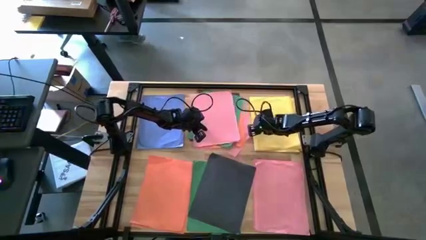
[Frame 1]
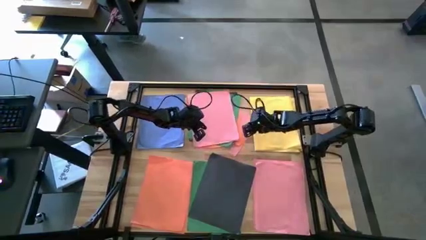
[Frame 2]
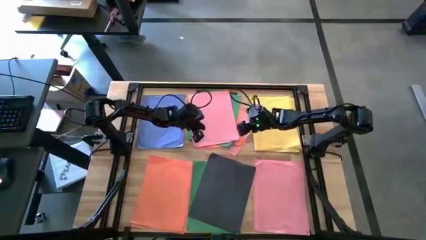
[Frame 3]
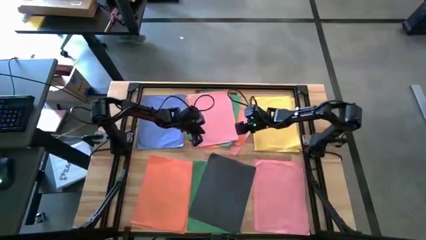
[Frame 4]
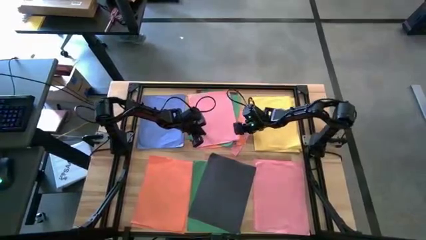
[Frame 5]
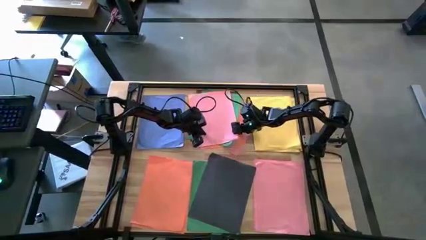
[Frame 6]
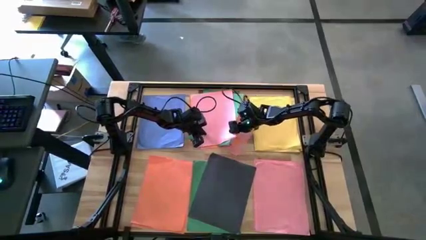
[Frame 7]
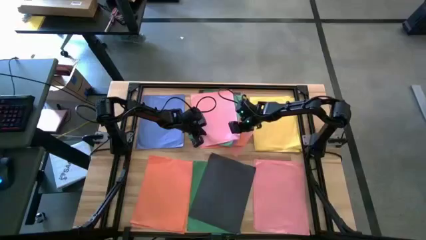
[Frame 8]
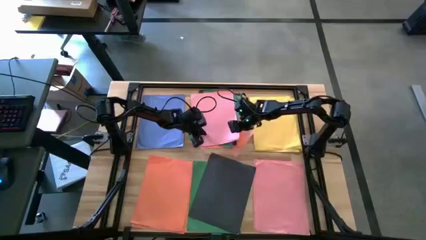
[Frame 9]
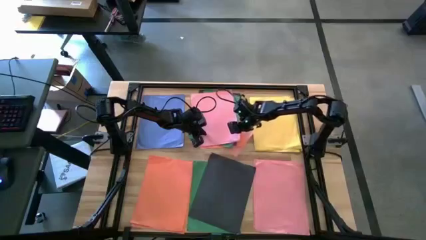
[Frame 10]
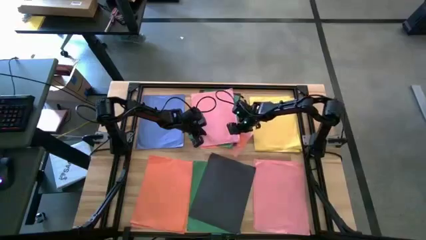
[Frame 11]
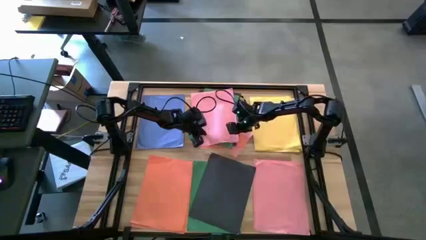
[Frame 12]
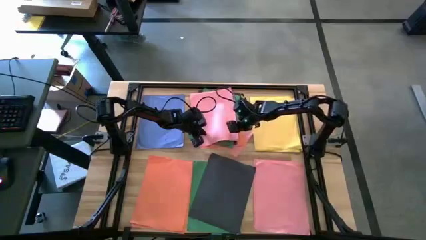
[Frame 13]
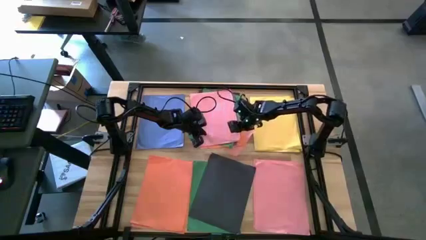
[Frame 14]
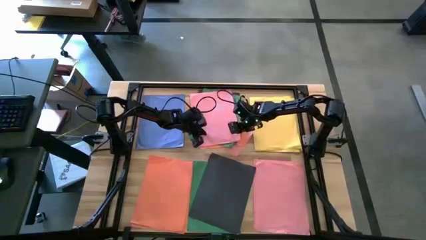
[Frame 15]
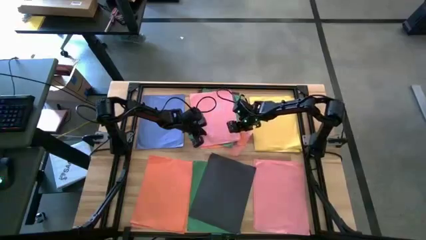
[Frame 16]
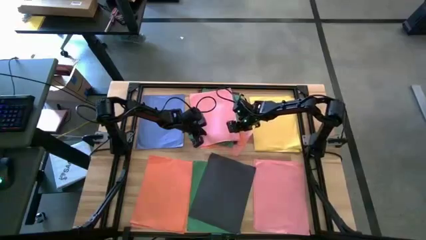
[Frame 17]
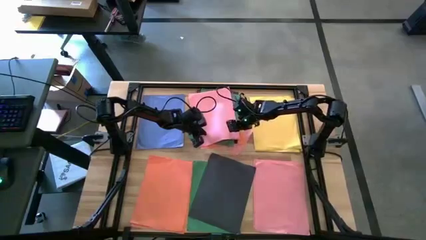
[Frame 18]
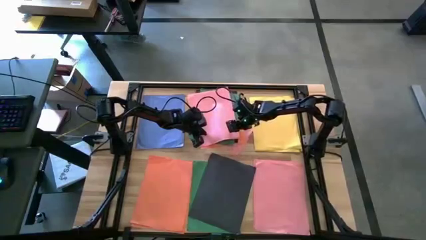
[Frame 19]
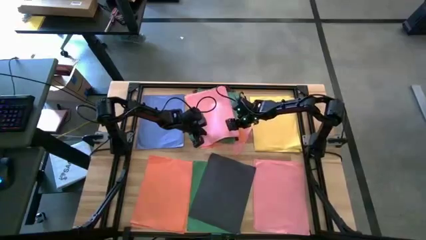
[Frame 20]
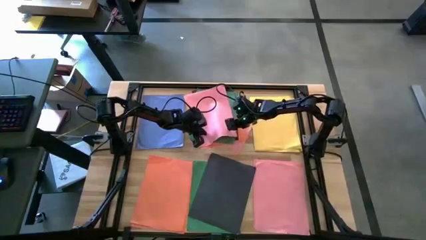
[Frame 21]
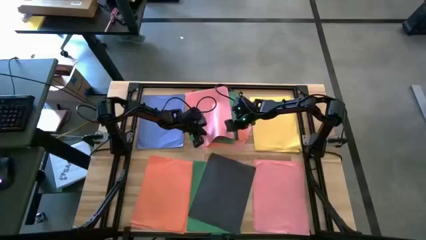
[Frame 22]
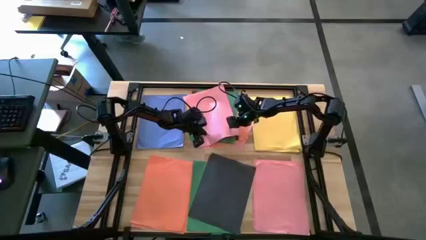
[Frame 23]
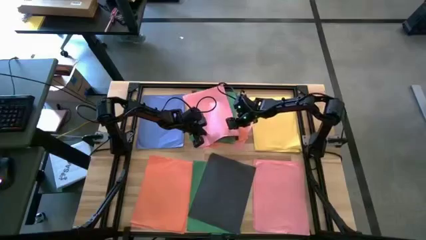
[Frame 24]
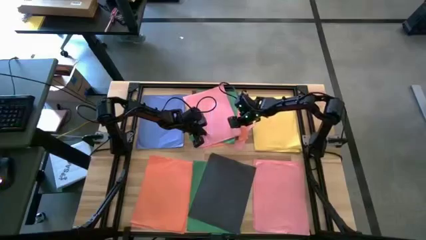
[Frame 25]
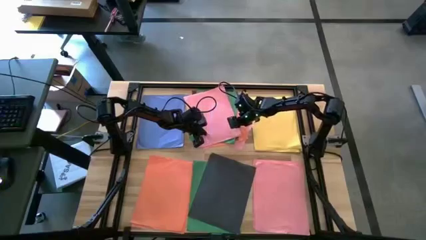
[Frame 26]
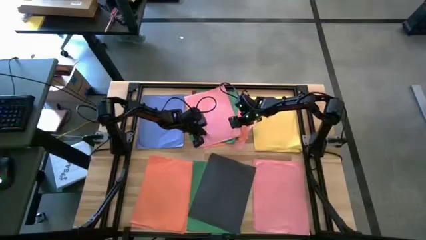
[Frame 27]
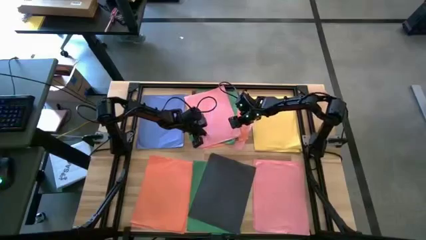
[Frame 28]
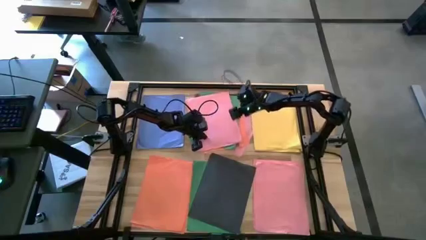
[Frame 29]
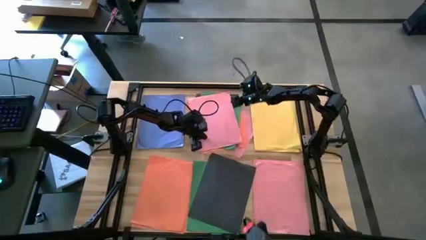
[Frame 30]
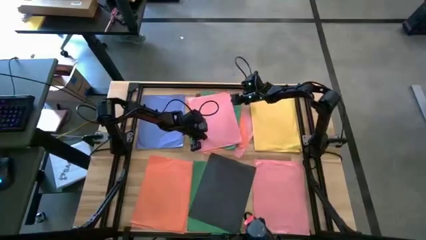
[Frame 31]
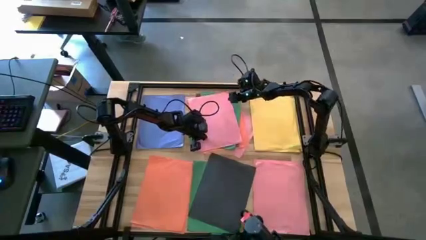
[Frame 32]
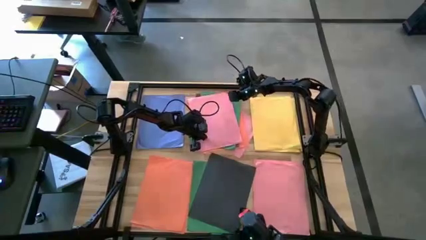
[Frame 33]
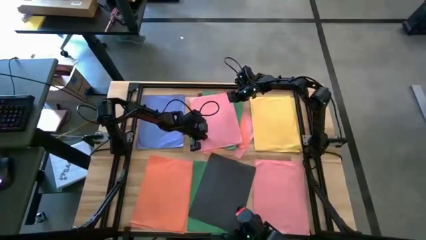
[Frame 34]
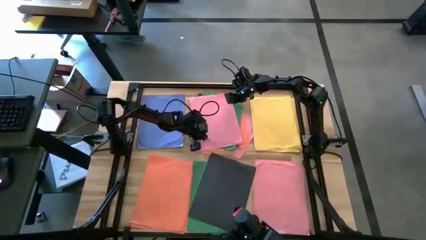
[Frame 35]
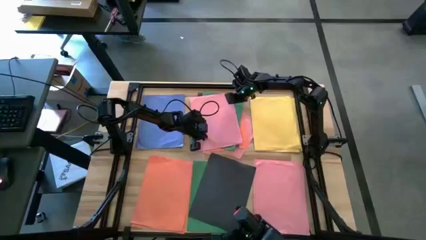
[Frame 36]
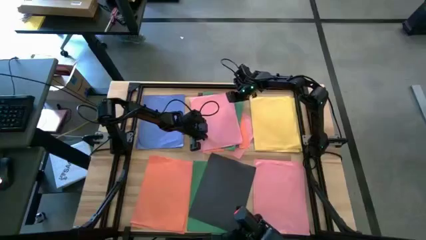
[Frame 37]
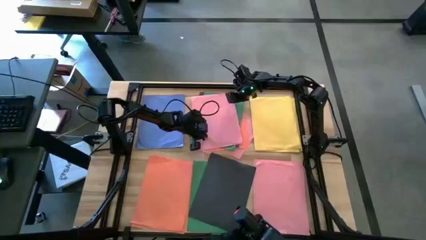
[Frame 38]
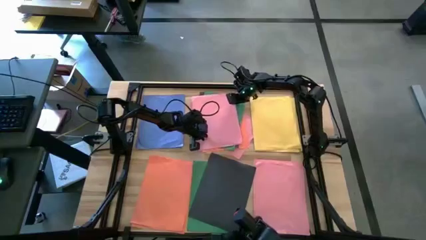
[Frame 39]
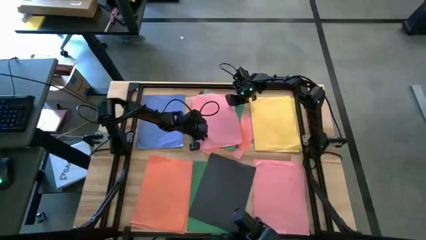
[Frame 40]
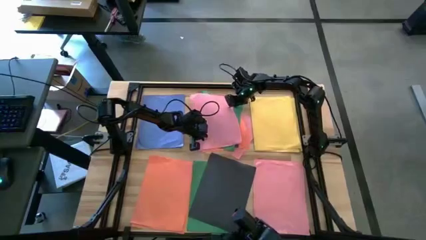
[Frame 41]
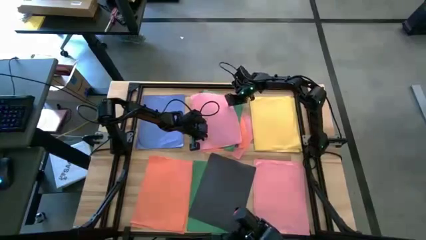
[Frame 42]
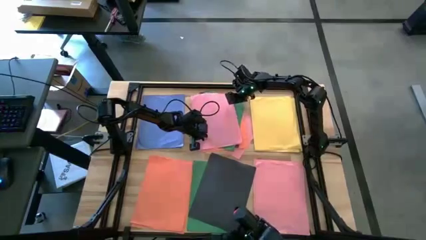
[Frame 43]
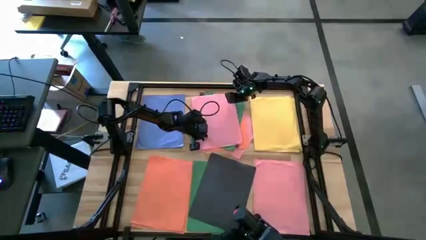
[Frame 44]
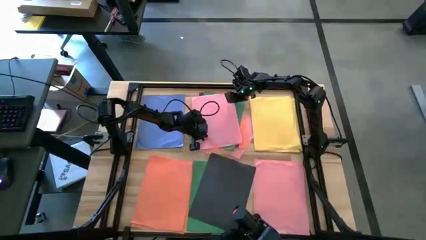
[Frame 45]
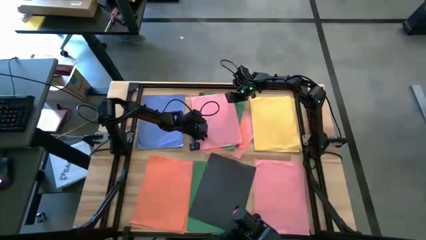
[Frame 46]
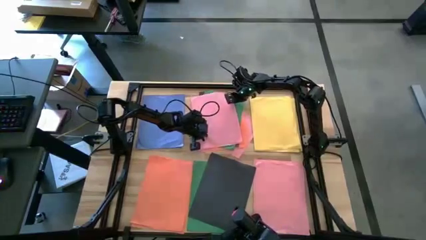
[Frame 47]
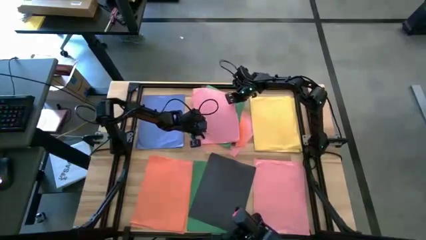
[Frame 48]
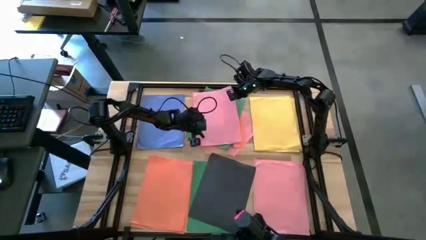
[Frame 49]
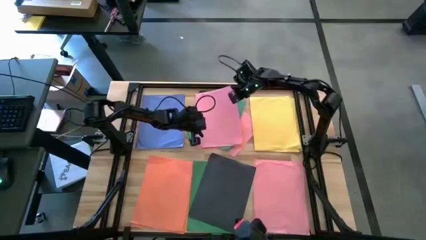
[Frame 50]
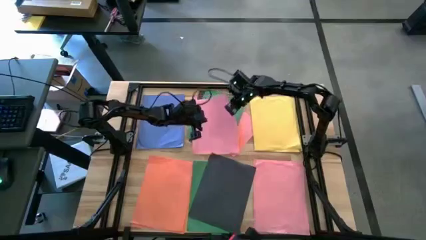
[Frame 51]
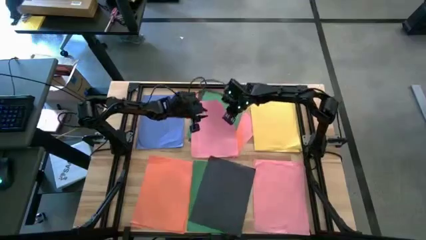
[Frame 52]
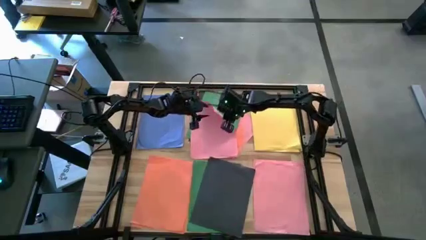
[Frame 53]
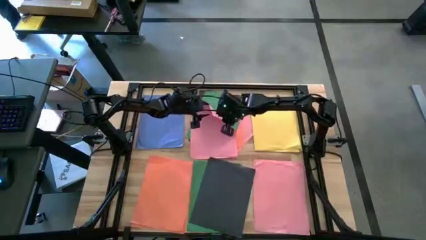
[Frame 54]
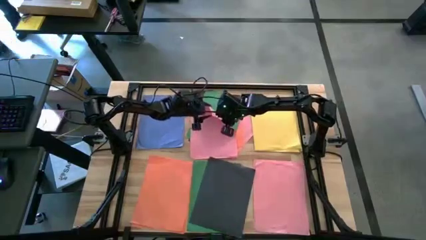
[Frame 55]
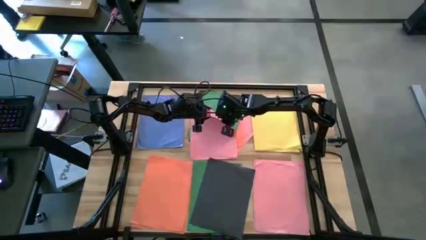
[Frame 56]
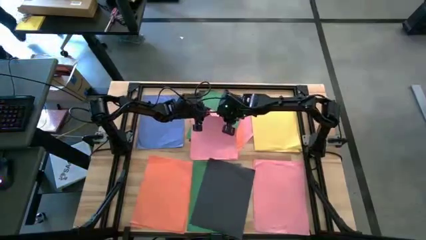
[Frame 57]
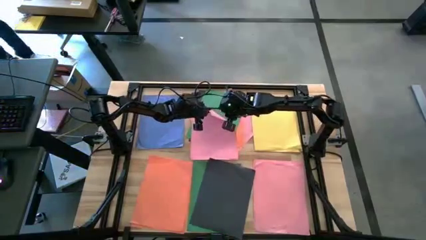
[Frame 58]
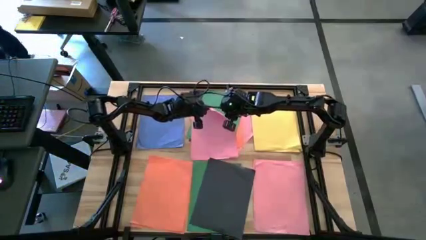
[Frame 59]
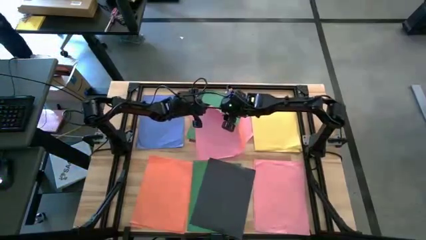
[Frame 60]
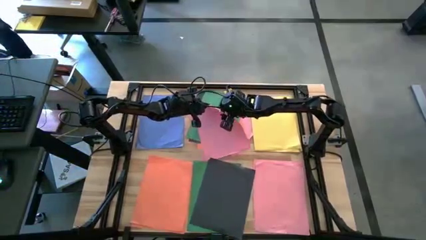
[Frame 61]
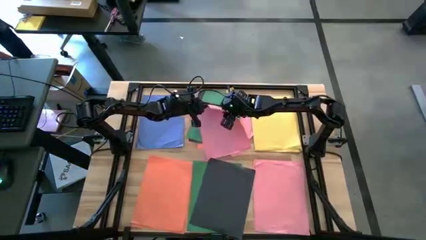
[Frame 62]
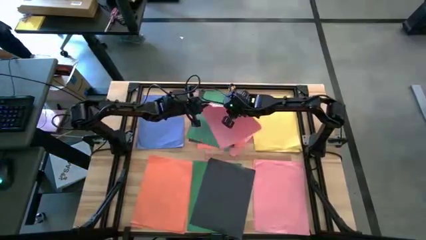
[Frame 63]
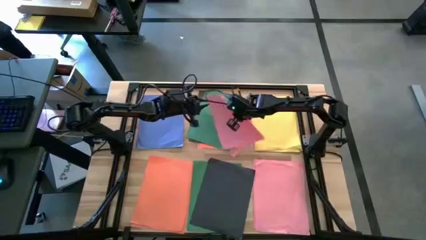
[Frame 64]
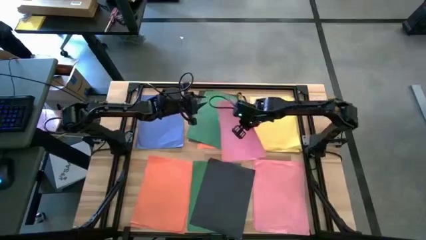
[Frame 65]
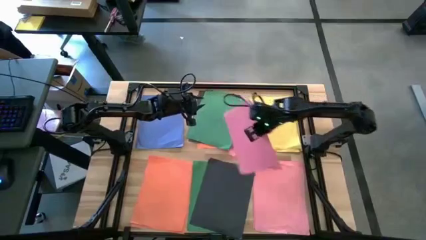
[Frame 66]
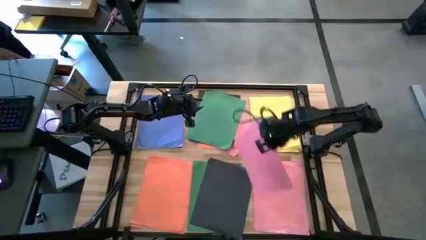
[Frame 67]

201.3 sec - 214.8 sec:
Task: Organize paper
Stack the top pink paper on the bottom pink paper
